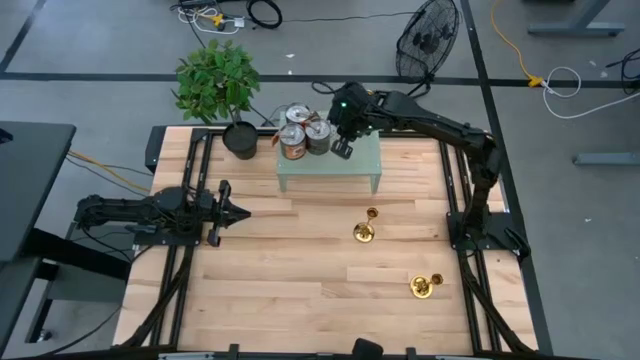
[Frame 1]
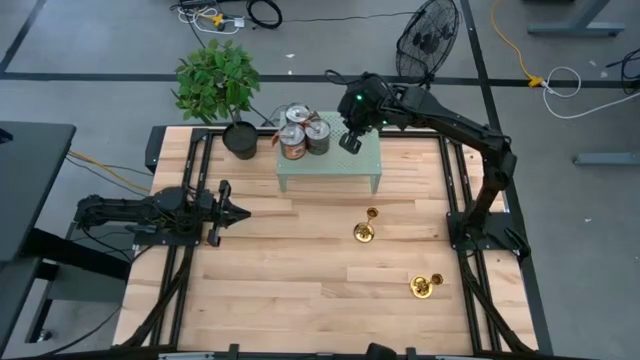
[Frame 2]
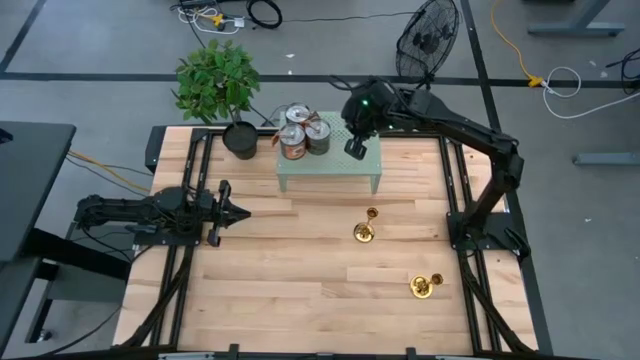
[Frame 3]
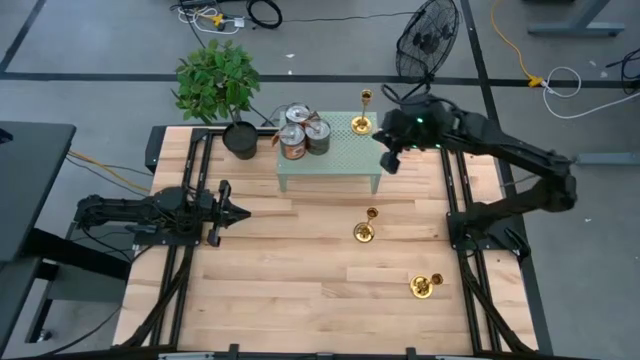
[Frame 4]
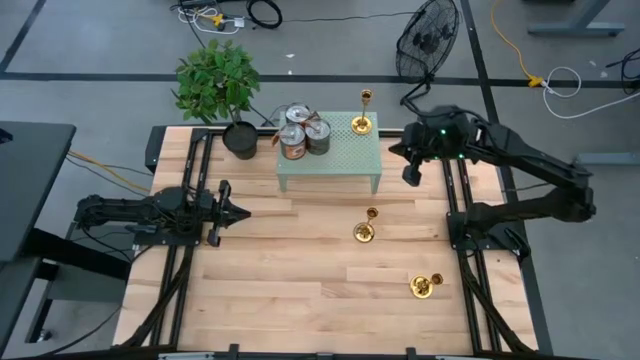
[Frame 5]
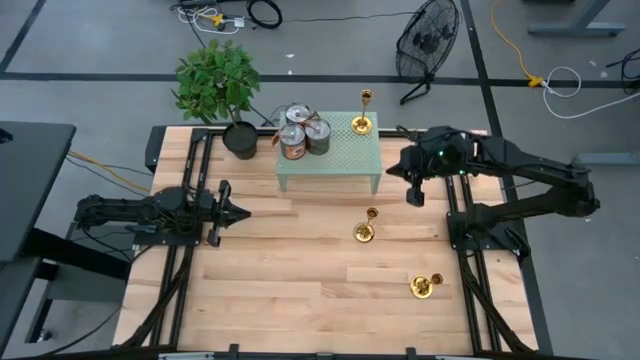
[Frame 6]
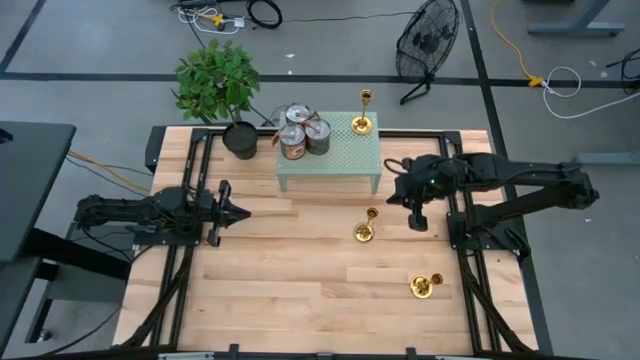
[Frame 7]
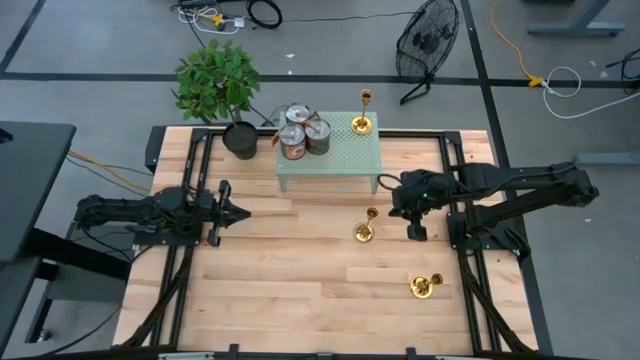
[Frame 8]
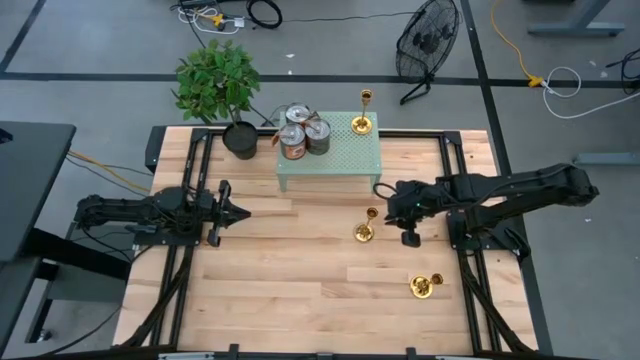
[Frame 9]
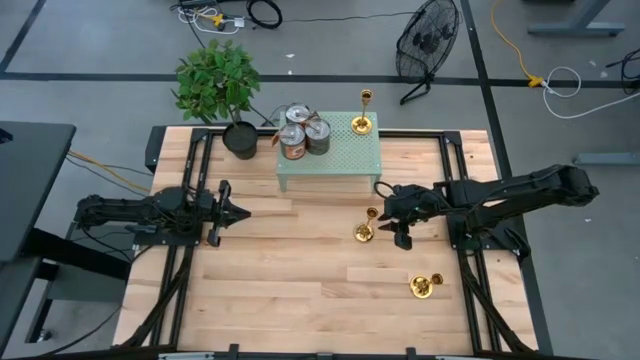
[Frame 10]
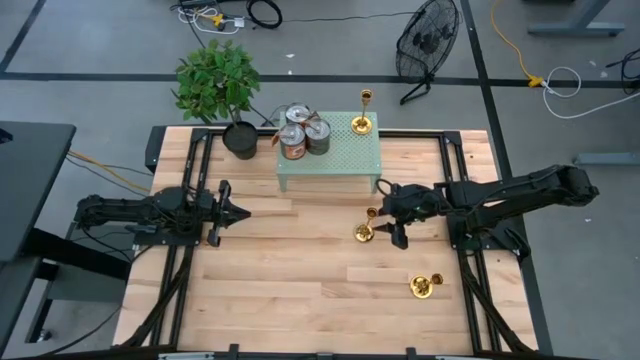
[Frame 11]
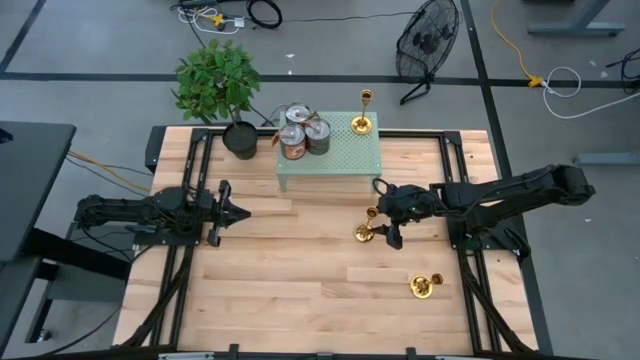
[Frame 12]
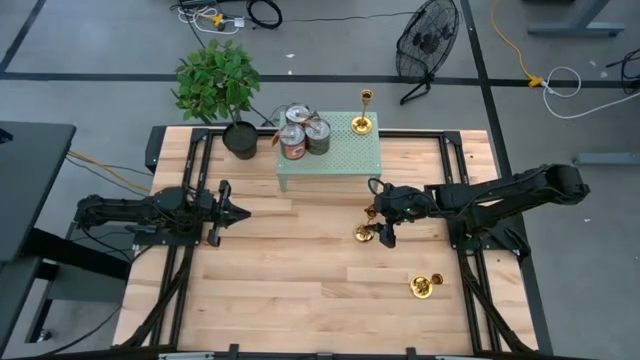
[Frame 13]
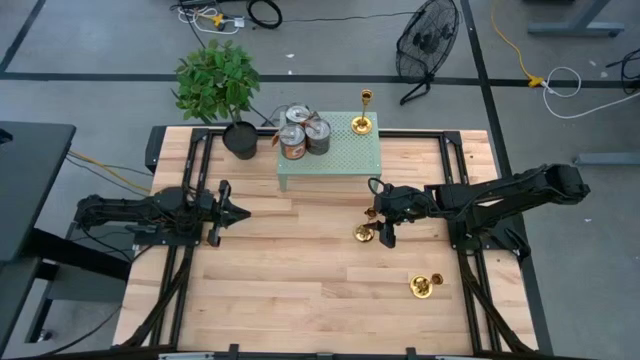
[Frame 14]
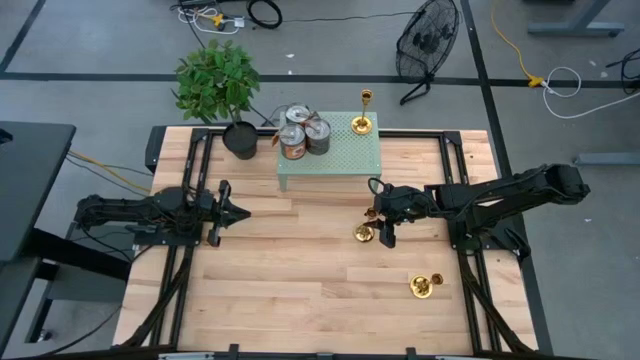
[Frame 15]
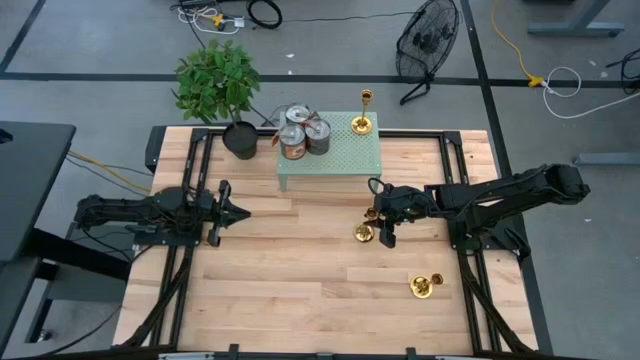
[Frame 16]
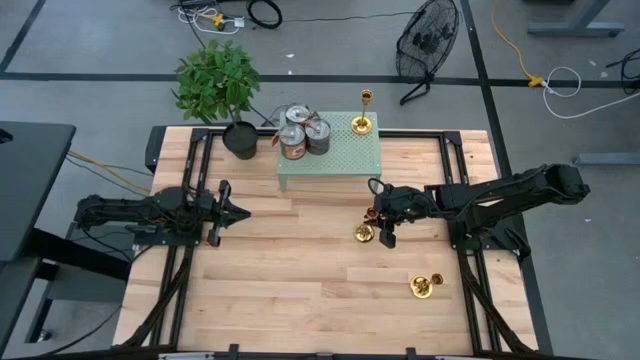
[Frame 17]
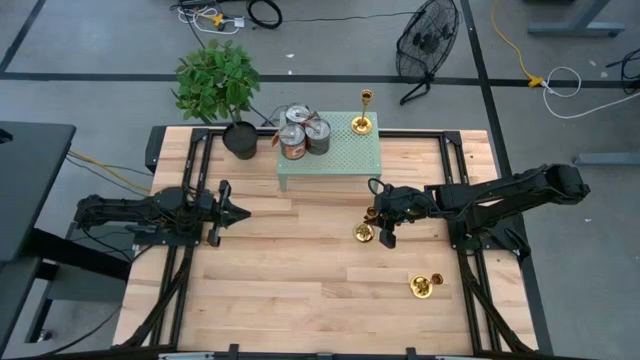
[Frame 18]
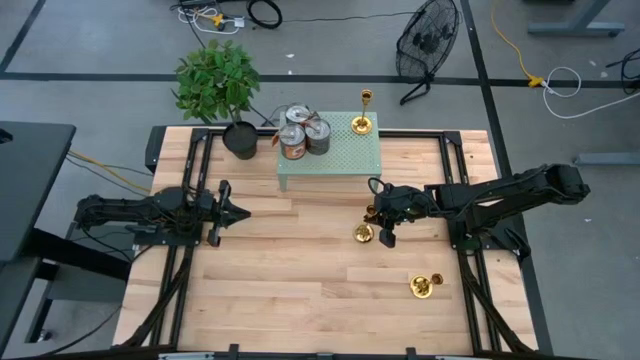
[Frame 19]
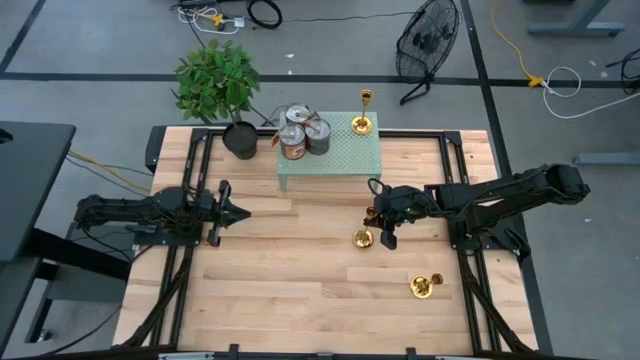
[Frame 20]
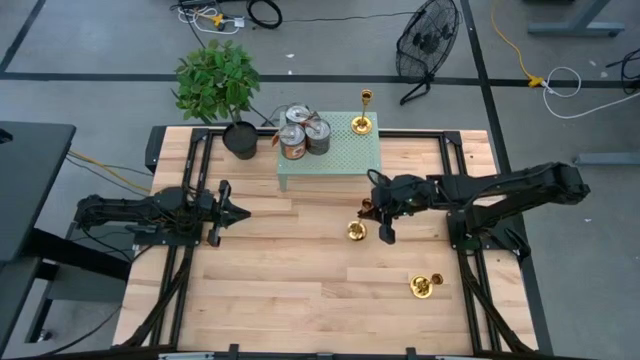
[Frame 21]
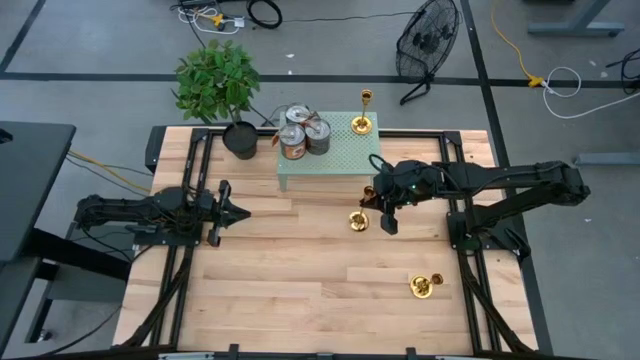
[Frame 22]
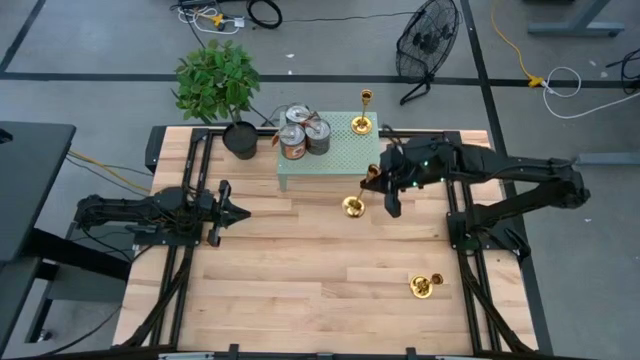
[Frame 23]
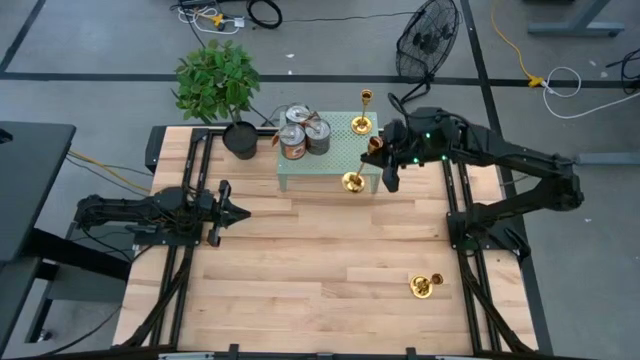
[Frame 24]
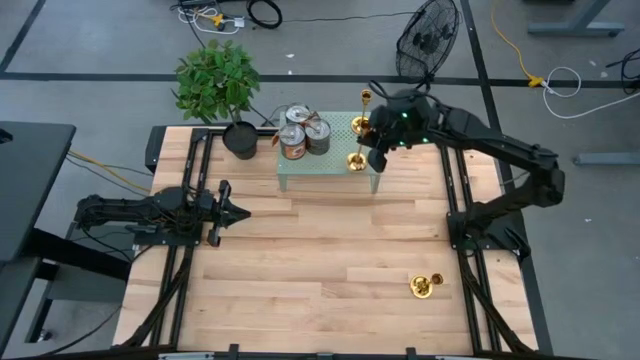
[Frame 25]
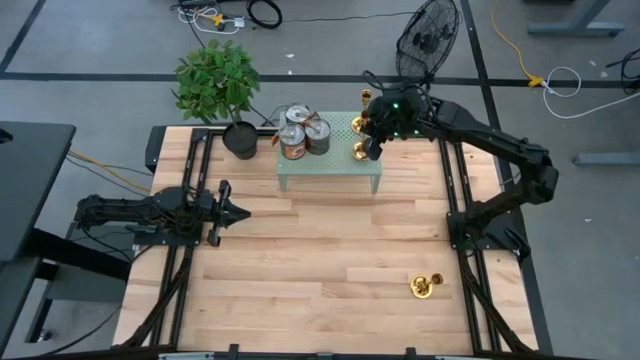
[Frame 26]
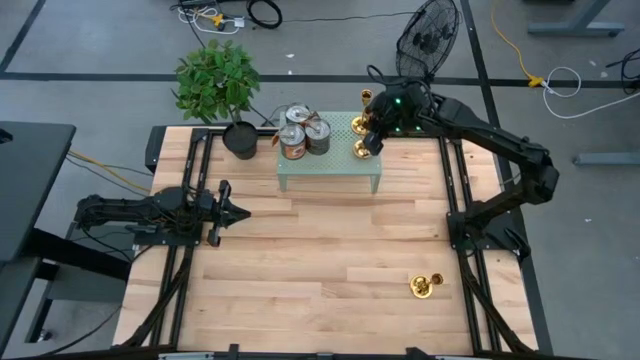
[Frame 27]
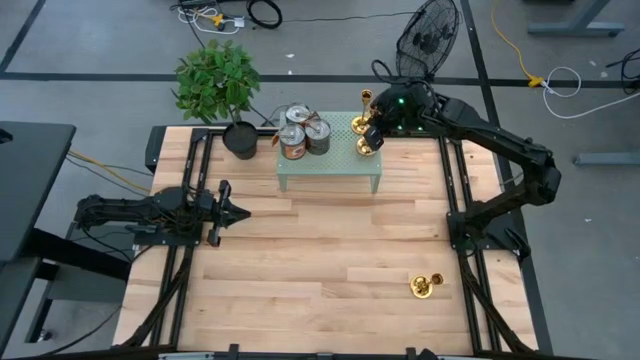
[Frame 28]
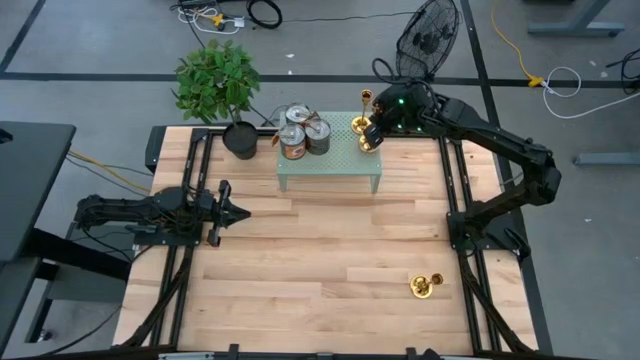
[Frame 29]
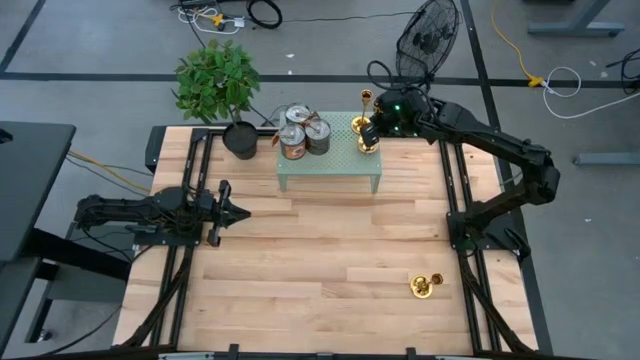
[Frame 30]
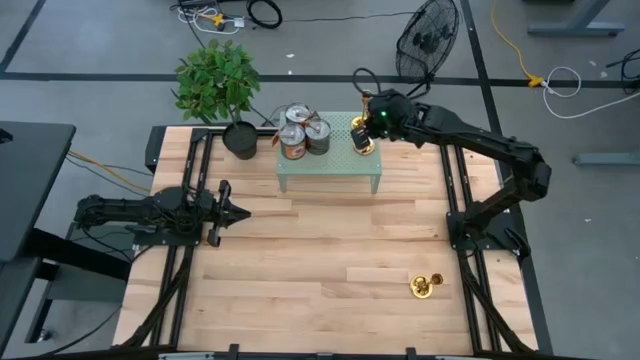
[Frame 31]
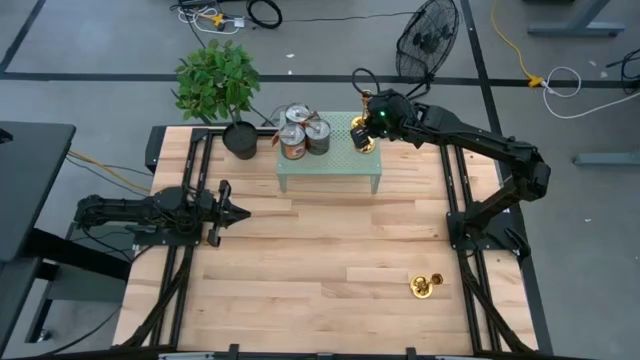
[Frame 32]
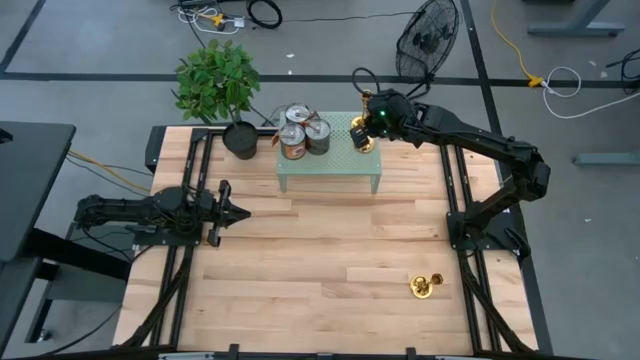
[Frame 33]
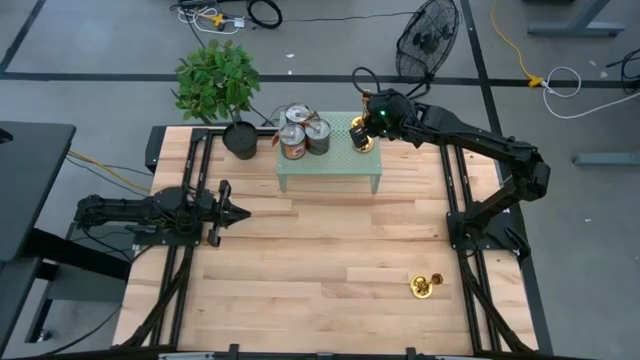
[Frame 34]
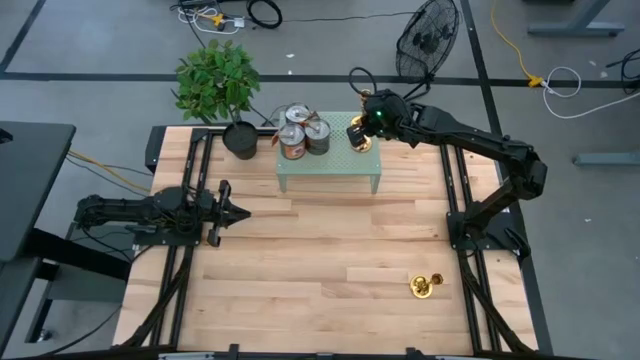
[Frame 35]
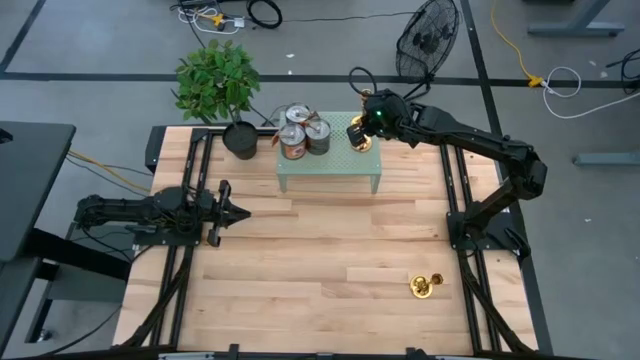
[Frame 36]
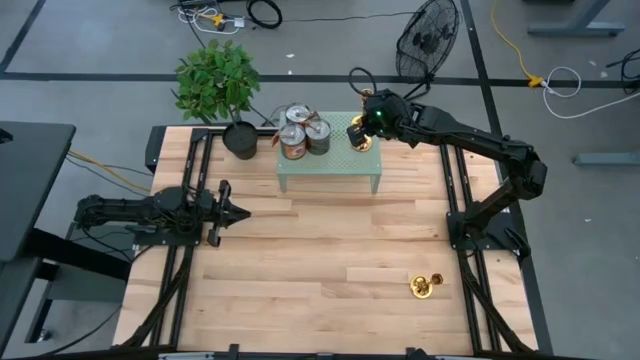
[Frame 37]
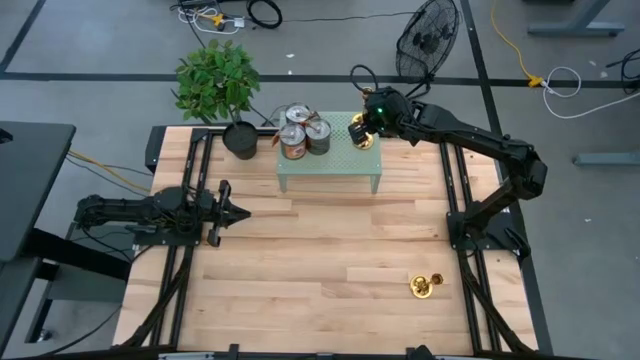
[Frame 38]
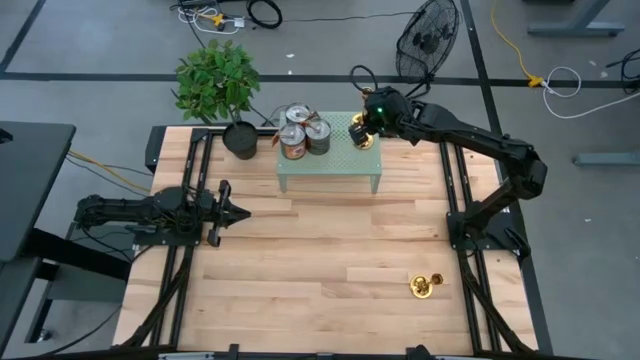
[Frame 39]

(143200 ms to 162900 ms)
Task: Pick & Place candle stick holders
Put the top gold candle holder on the shelf

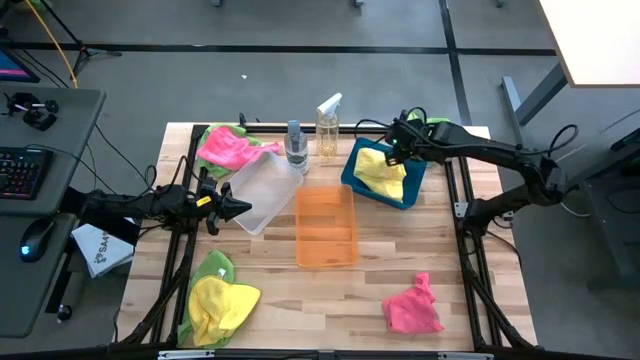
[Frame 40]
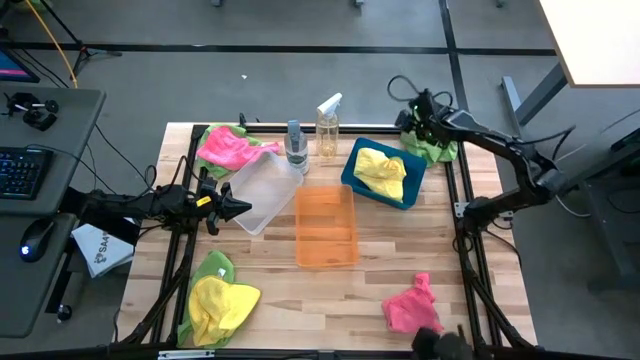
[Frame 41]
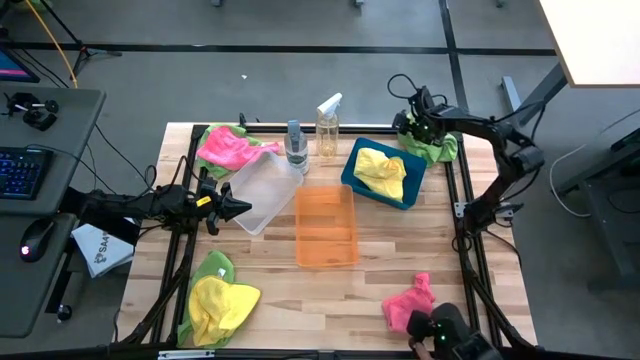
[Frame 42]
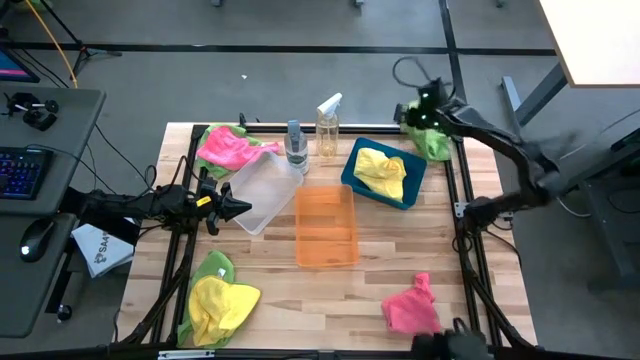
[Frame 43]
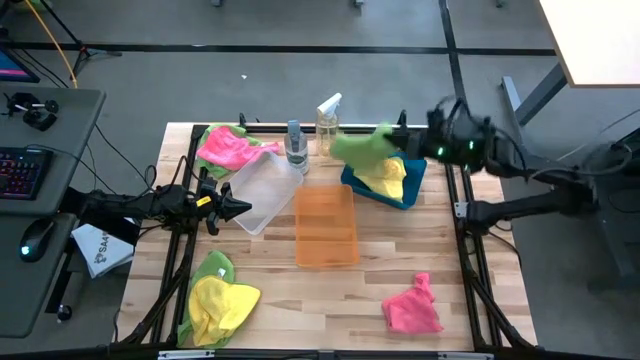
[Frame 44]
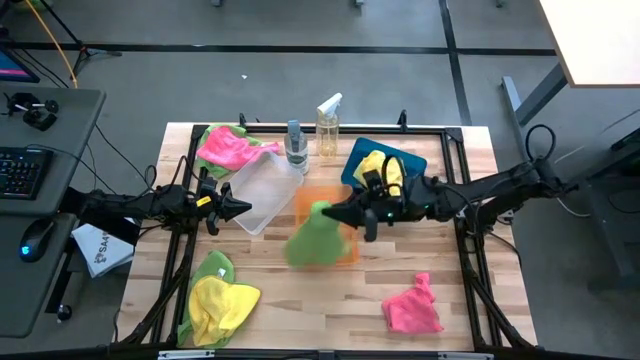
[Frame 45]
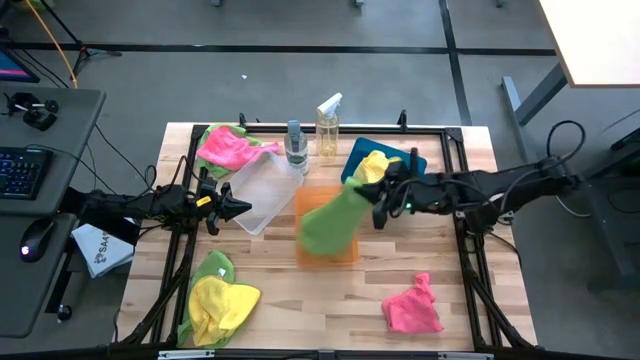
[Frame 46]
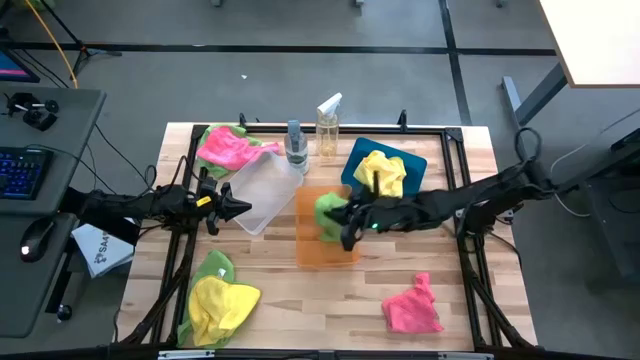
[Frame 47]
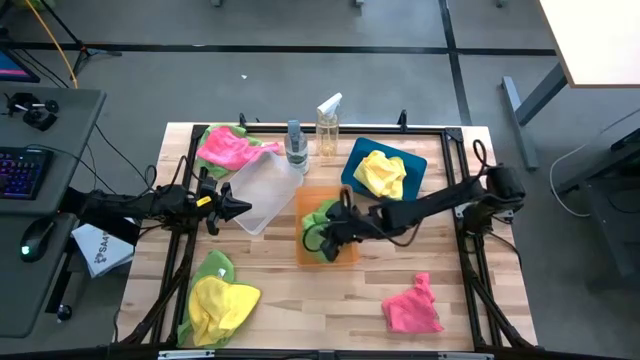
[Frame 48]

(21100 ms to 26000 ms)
Task: Sort microfiber towel by color & place in baskets
Put the top right green microfiber towel into the orange bin
